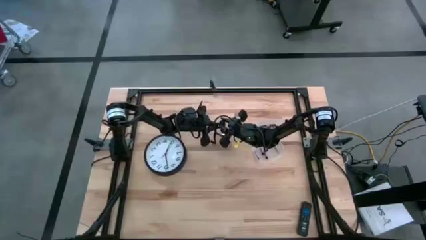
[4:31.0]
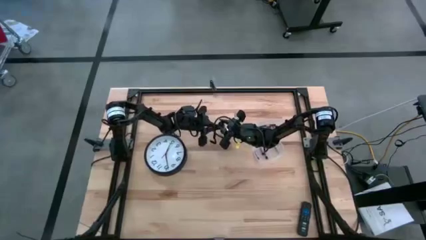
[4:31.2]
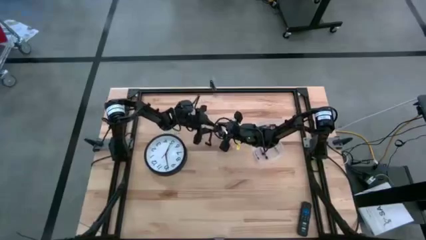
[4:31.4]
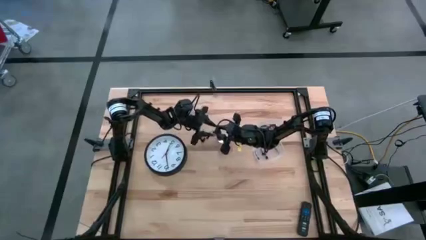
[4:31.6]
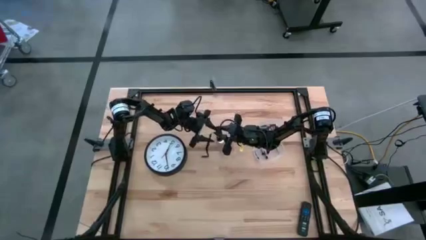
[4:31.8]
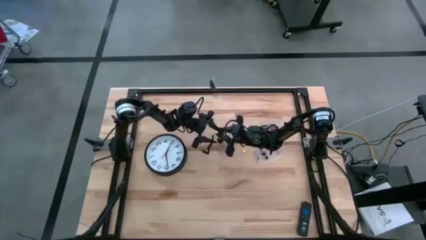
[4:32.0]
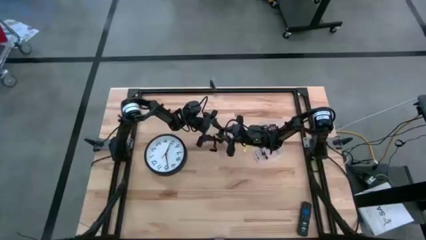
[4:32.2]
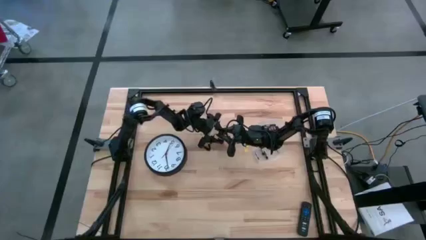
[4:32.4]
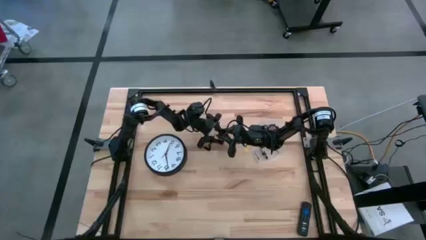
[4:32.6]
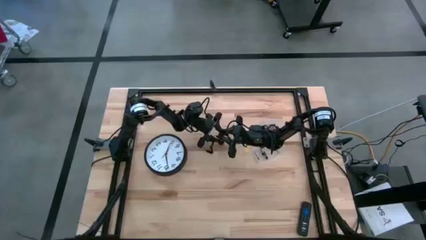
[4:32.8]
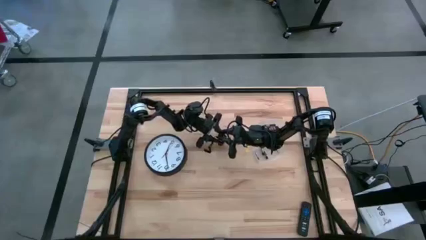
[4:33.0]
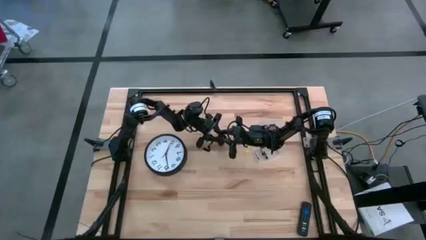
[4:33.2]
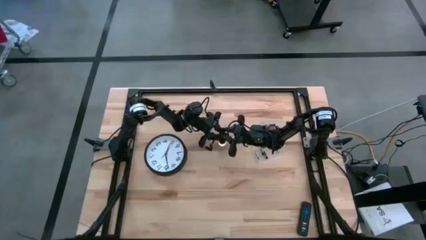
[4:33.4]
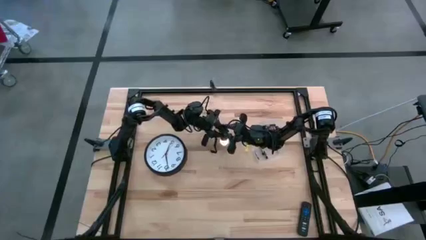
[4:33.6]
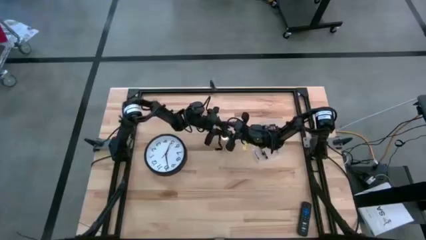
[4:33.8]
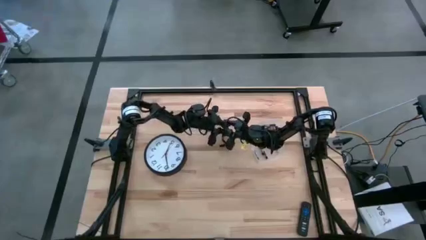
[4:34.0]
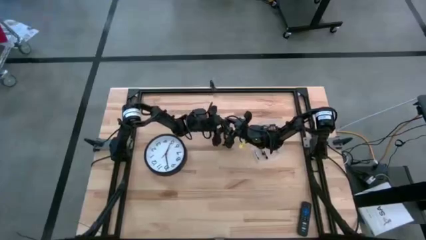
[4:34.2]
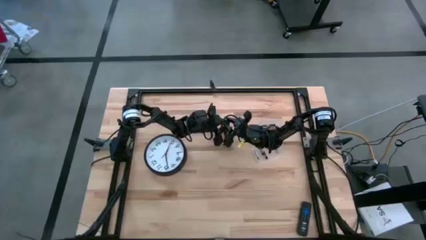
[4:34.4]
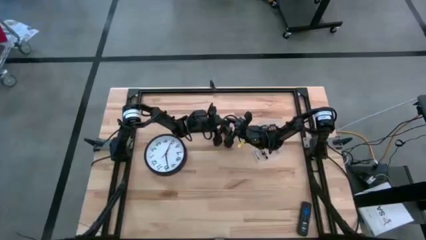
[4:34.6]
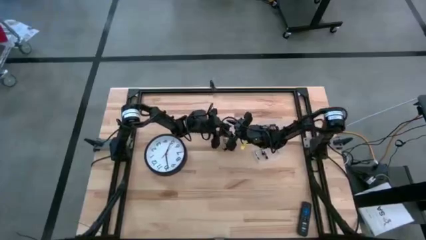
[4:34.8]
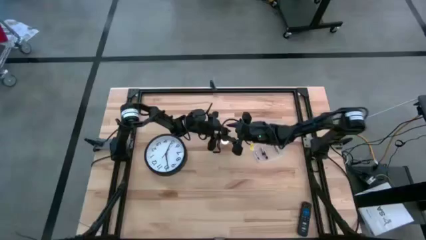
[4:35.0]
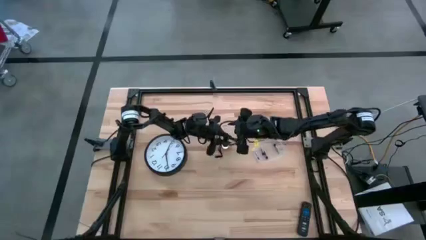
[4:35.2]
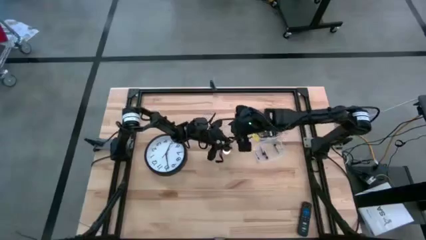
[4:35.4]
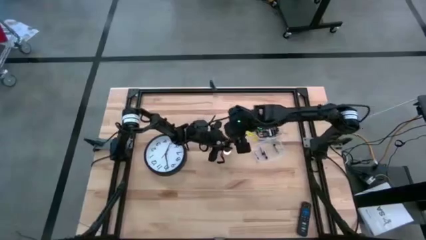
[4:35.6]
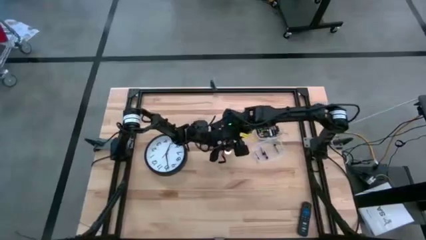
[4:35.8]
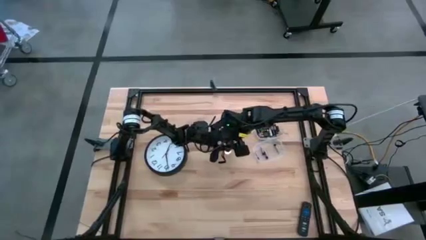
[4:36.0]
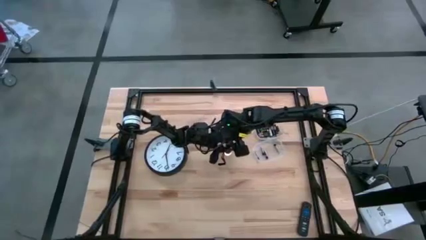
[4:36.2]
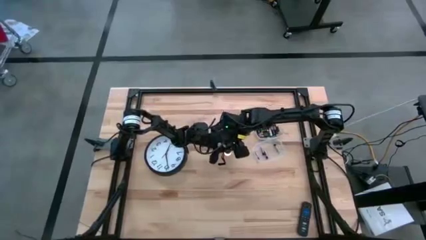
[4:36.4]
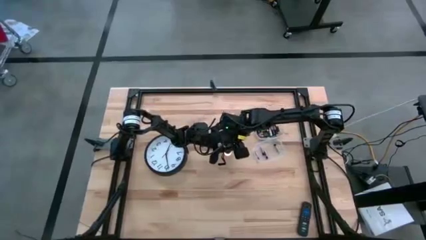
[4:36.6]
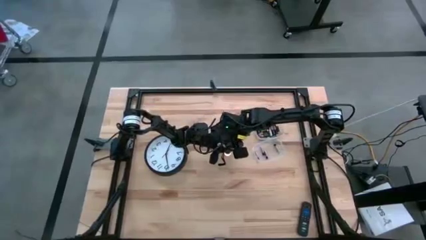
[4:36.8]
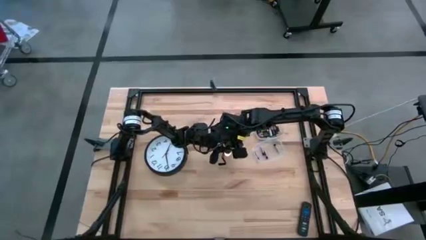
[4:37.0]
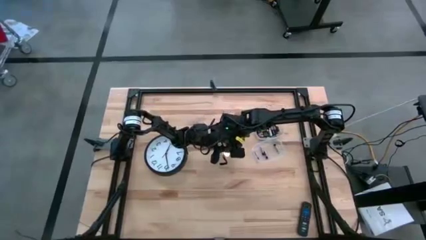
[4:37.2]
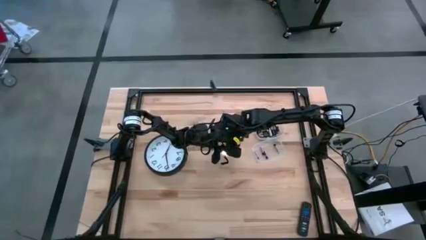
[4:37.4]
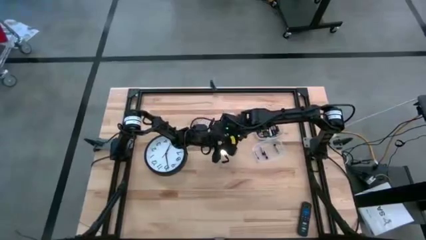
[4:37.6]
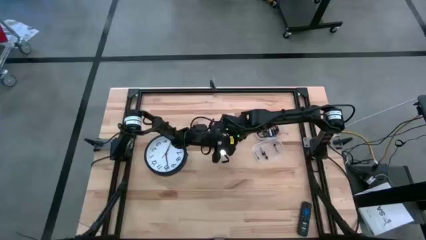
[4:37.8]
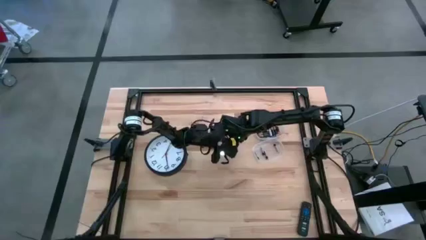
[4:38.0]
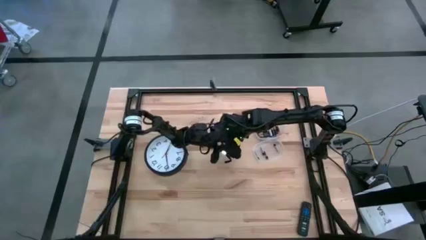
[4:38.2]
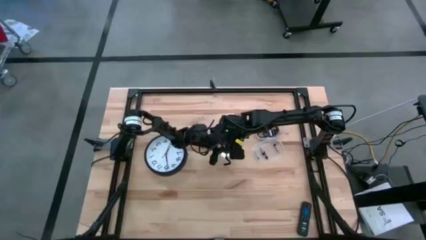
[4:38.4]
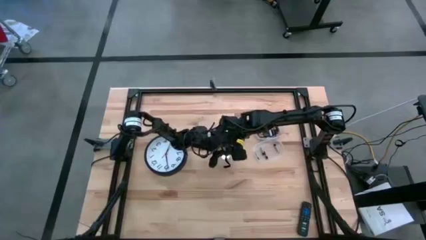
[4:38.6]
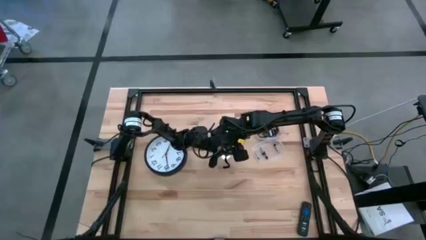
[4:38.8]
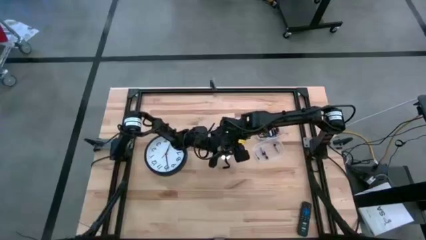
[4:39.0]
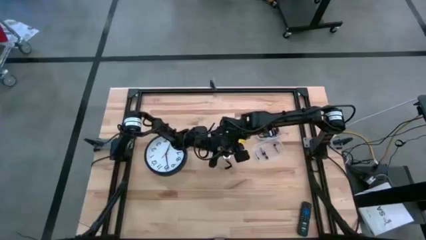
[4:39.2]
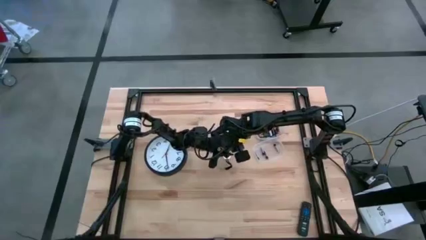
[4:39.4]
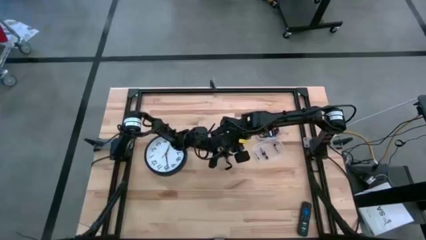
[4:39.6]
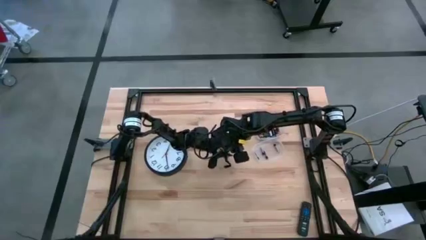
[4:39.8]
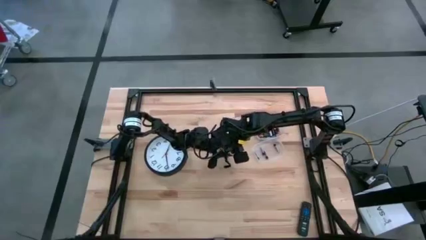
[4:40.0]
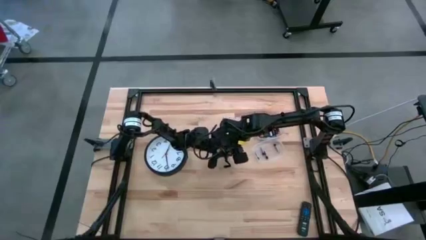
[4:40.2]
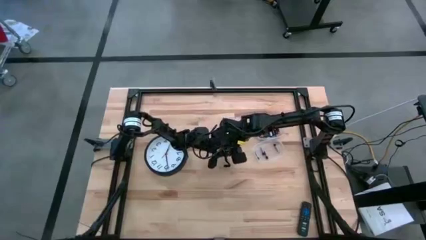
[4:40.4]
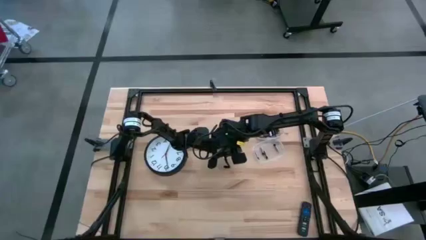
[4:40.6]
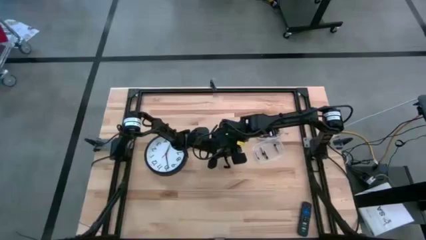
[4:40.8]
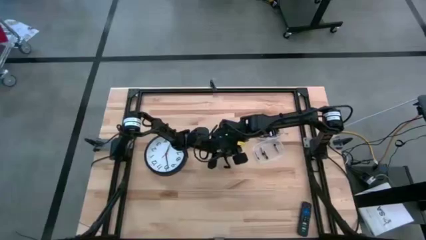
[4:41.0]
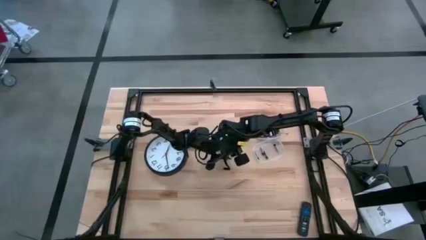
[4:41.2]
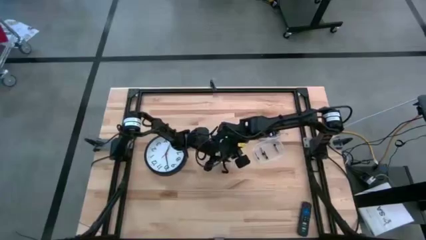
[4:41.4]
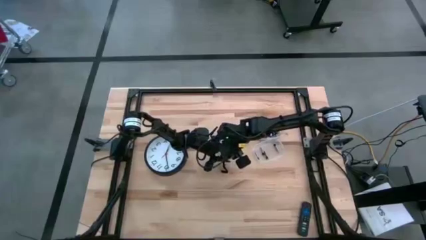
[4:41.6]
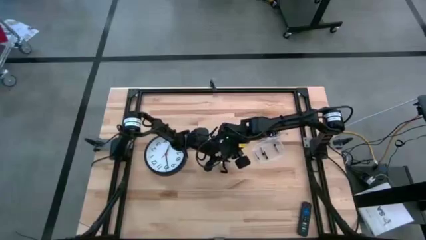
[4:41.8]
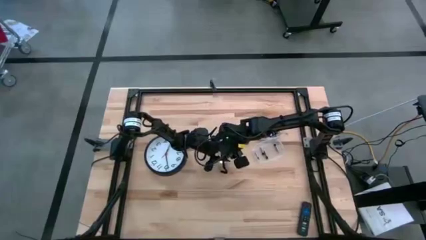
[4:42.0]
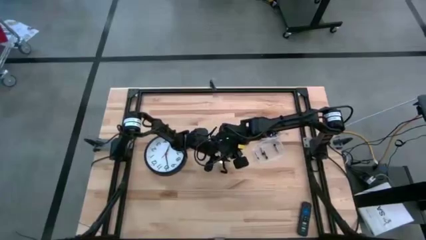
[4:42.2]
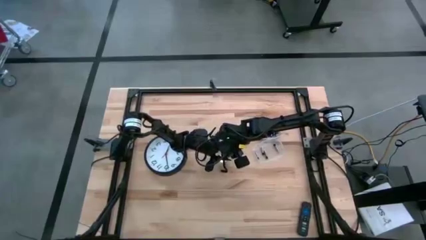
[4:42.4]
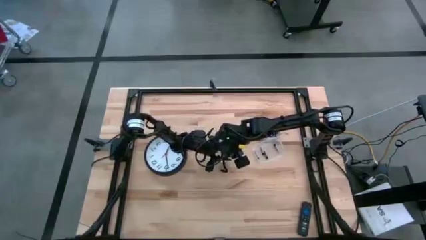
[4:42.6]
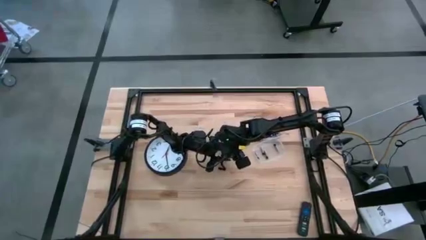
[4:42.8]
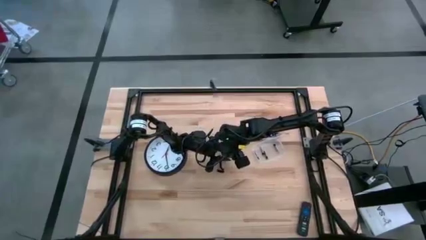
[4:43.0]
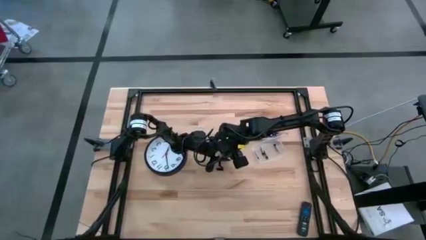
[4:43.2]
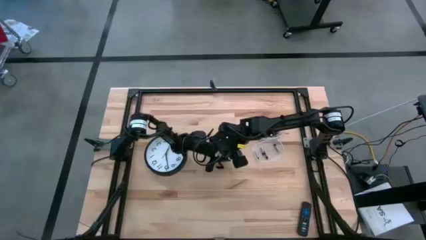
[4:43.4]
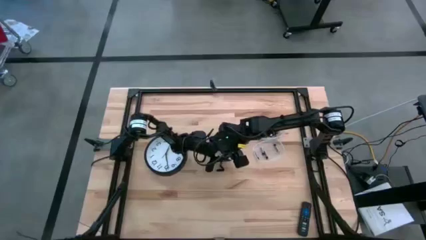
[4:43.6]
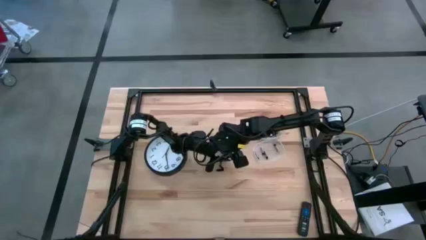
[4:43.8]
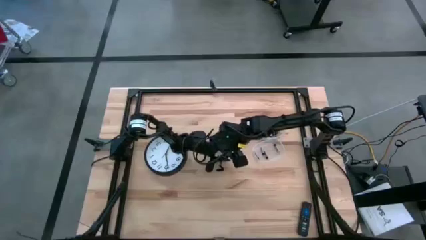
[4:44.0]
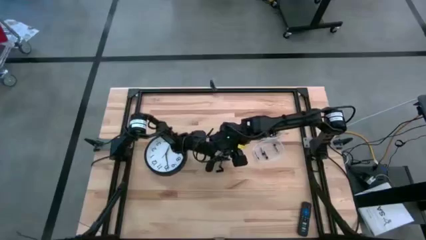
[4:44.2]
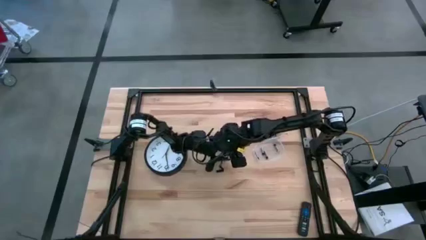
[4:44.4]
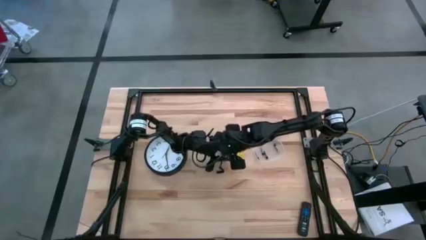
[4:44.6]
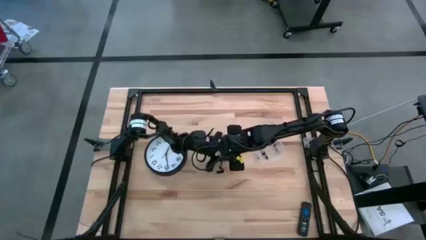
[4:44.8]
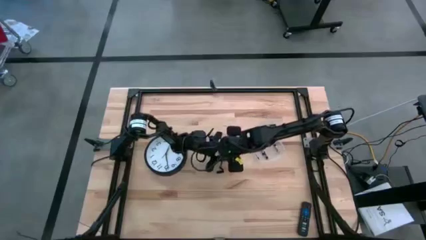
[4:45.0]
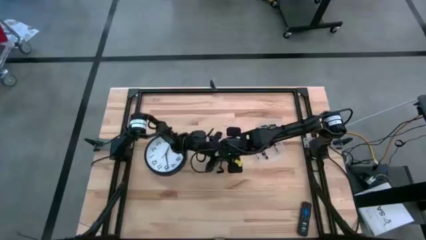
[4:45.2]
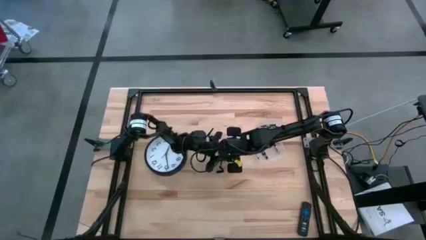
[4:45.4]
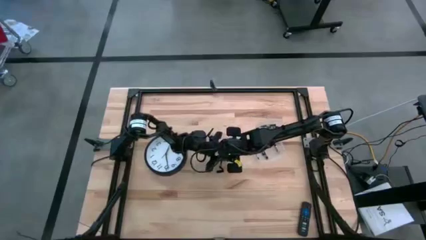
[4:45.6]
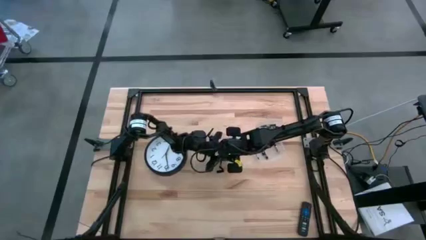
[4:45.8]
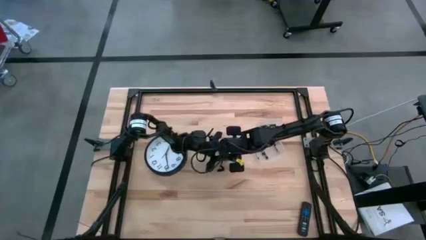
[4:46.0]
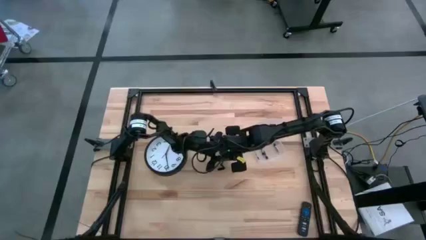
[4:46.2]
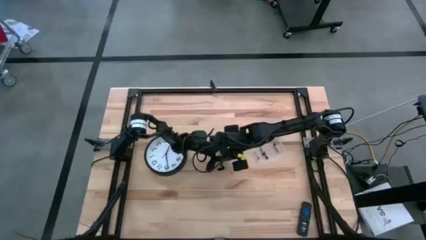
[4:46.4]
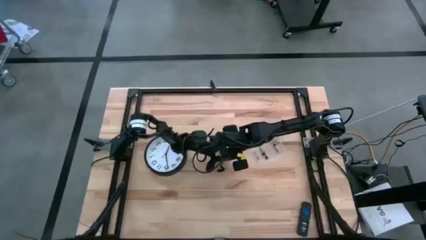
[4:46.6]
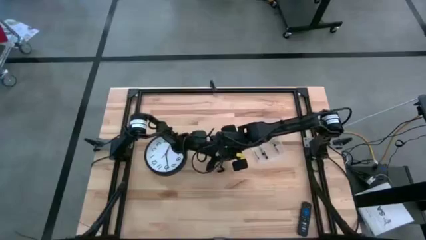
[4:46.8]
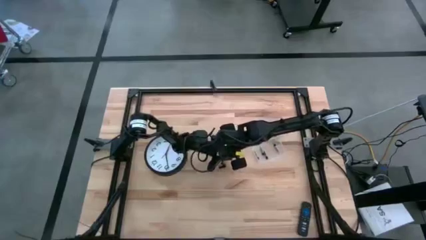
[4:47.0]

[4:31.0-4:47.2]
Task: Insert battery
Close the black battery compartment
